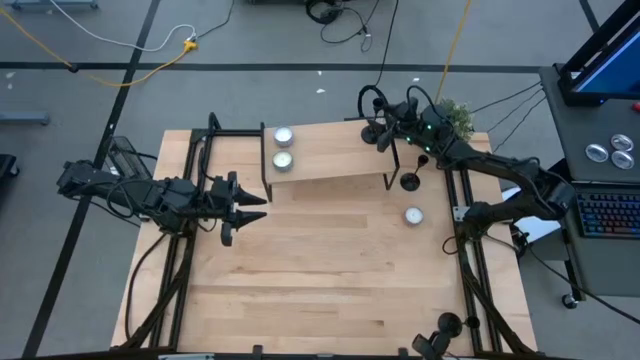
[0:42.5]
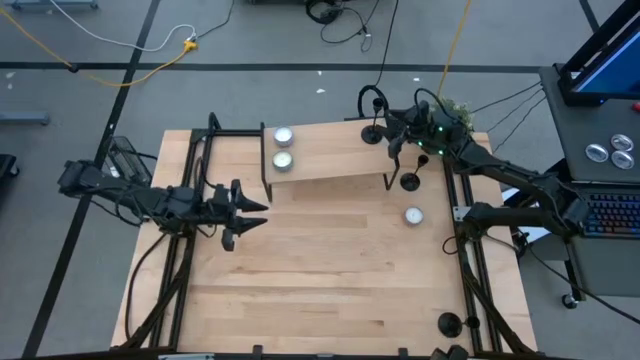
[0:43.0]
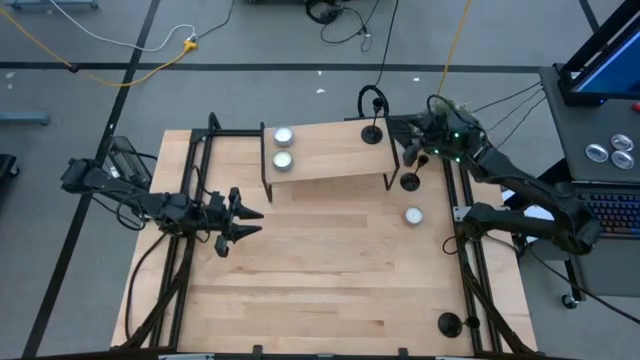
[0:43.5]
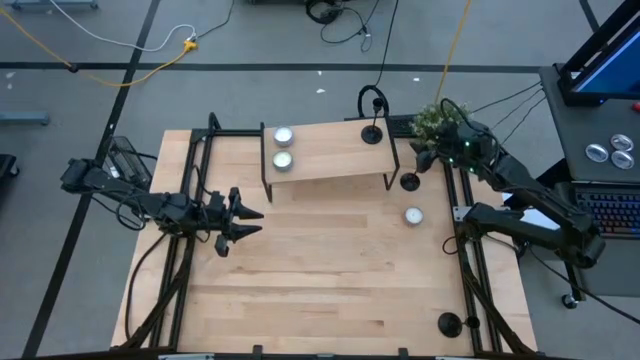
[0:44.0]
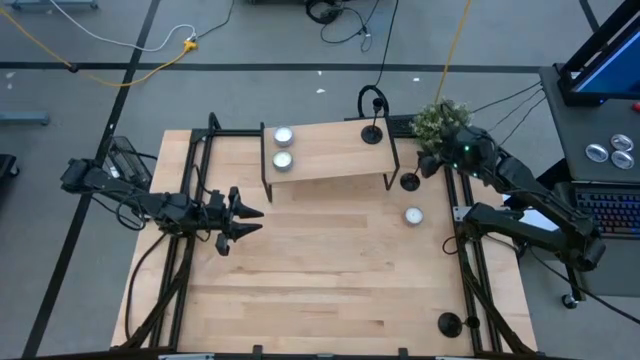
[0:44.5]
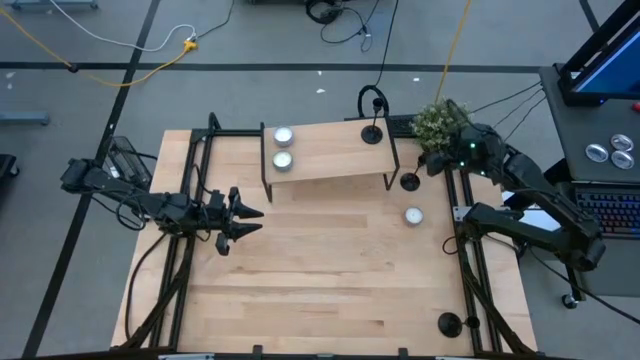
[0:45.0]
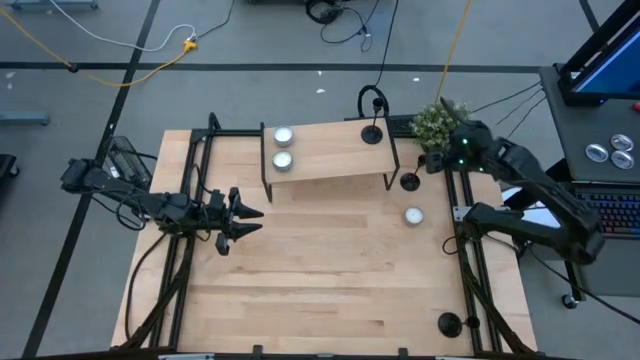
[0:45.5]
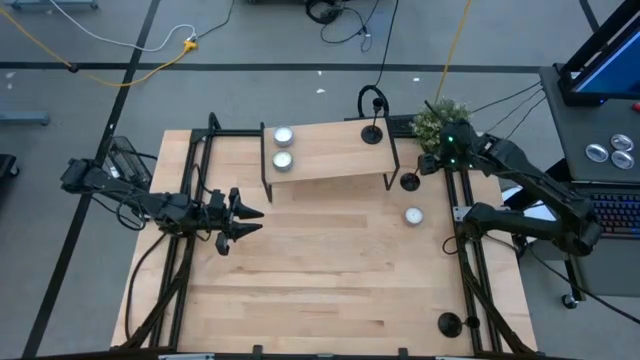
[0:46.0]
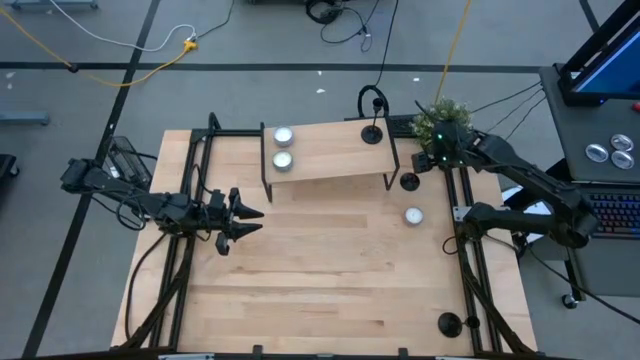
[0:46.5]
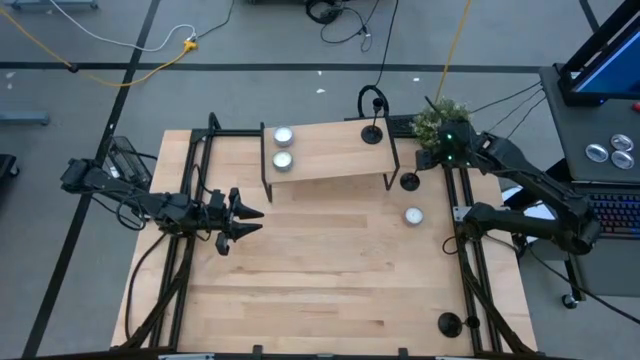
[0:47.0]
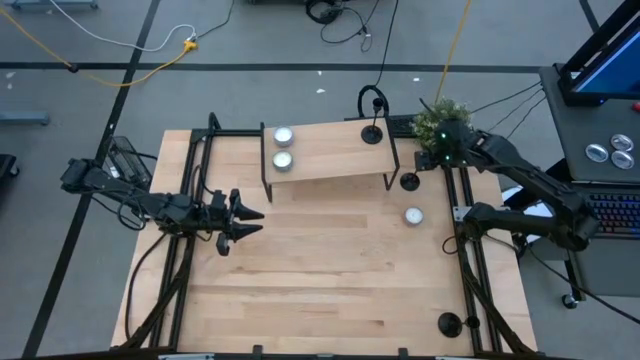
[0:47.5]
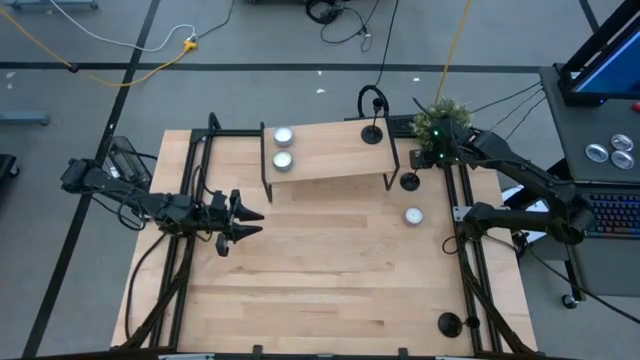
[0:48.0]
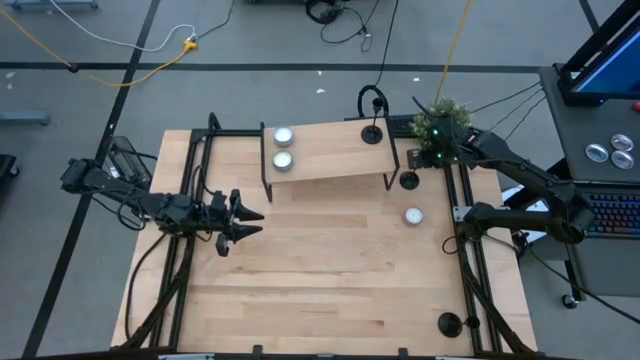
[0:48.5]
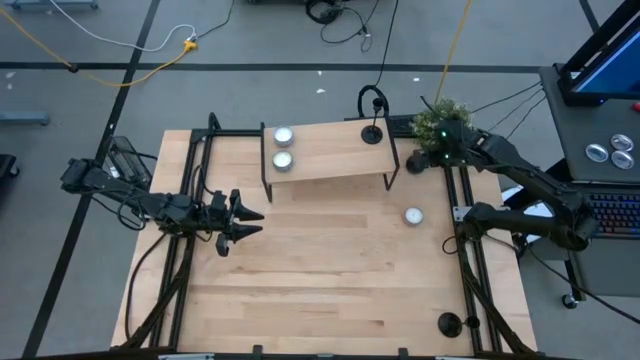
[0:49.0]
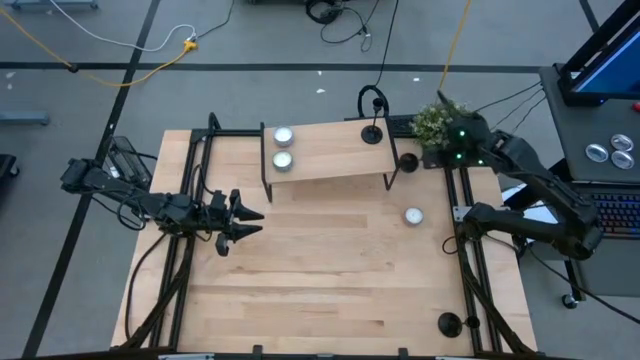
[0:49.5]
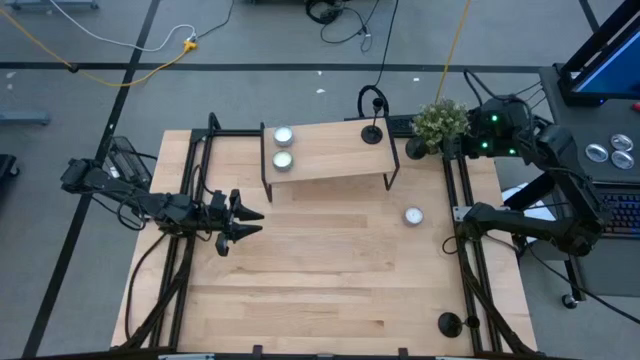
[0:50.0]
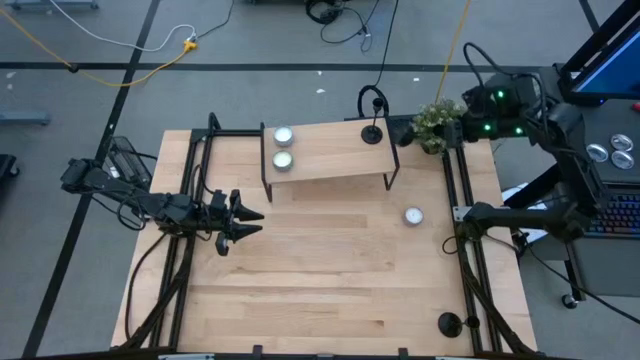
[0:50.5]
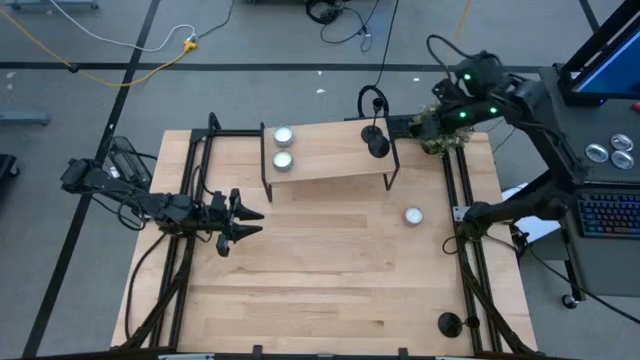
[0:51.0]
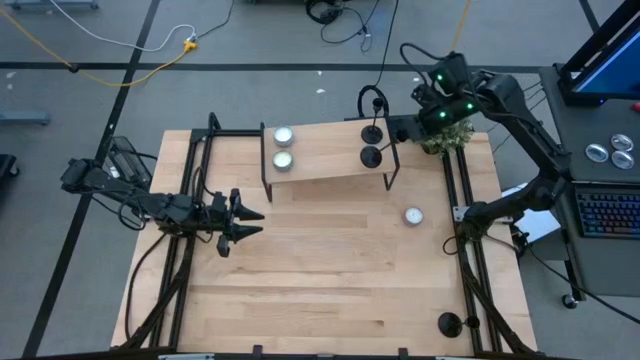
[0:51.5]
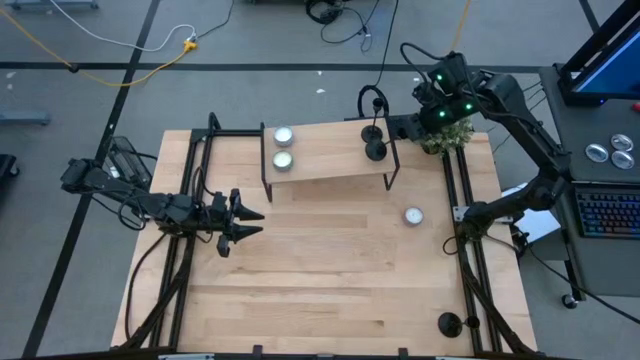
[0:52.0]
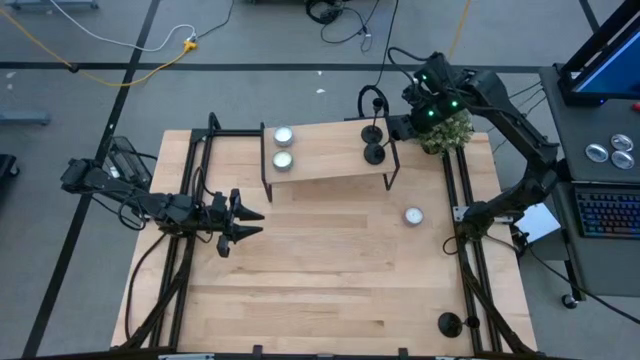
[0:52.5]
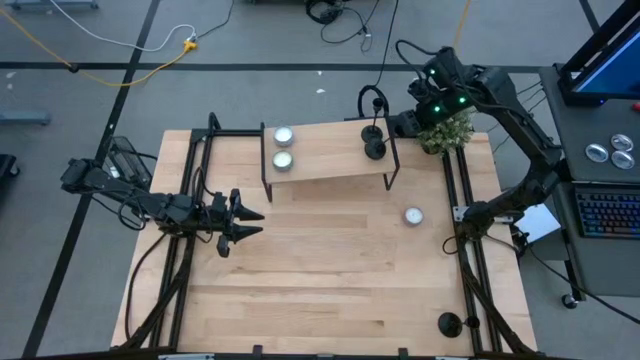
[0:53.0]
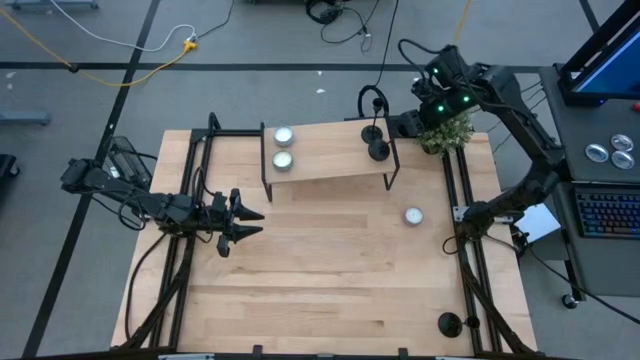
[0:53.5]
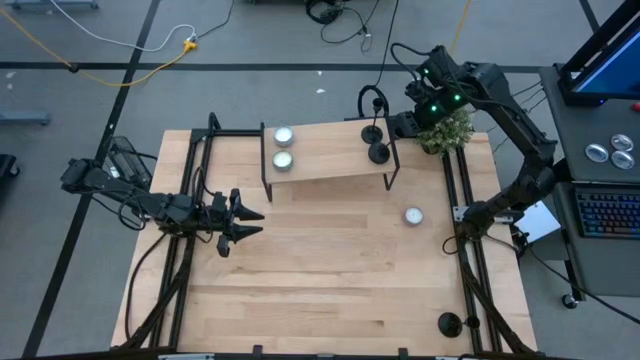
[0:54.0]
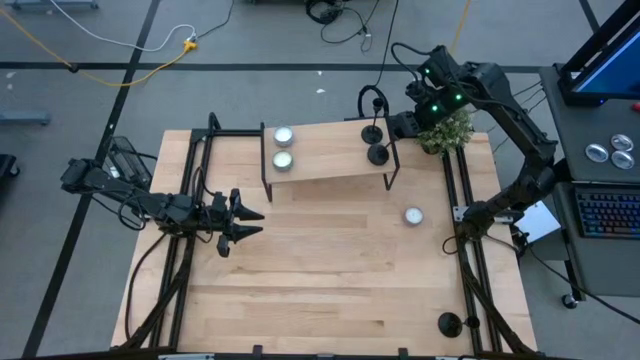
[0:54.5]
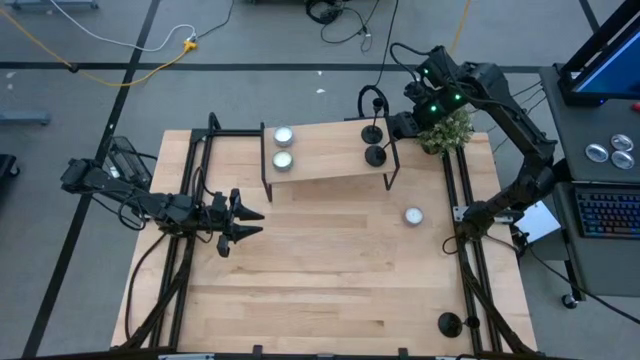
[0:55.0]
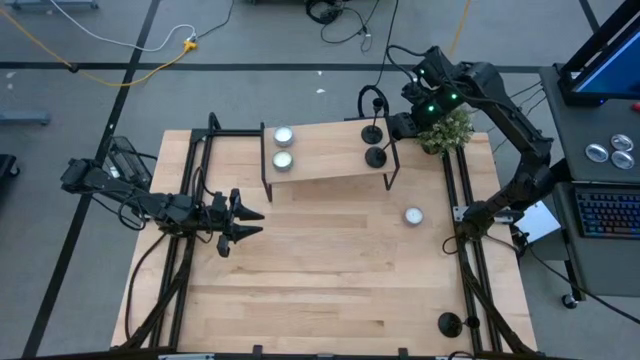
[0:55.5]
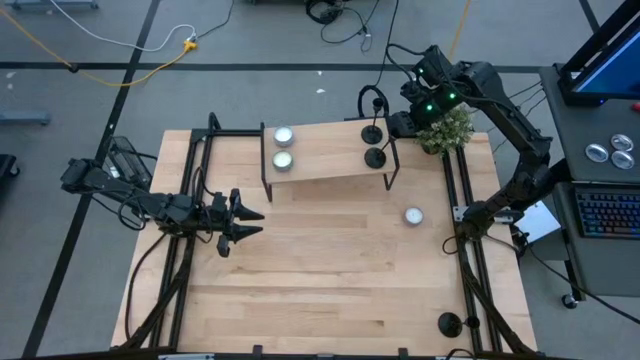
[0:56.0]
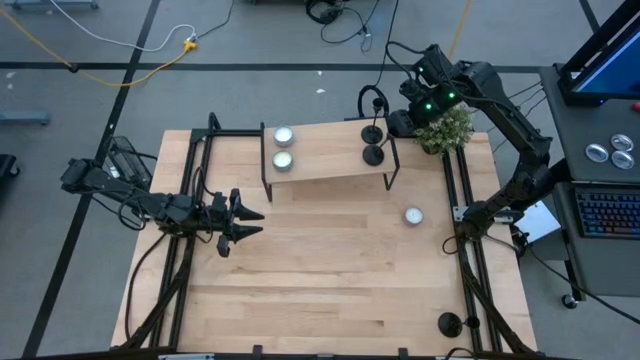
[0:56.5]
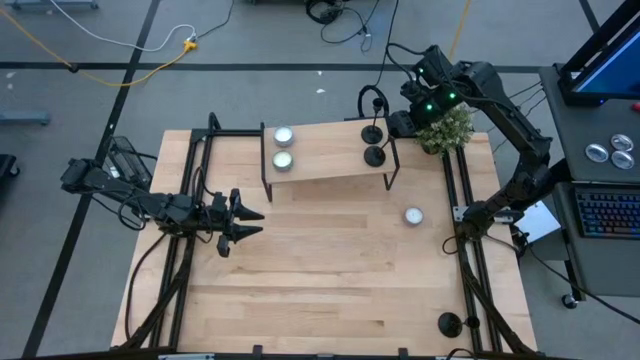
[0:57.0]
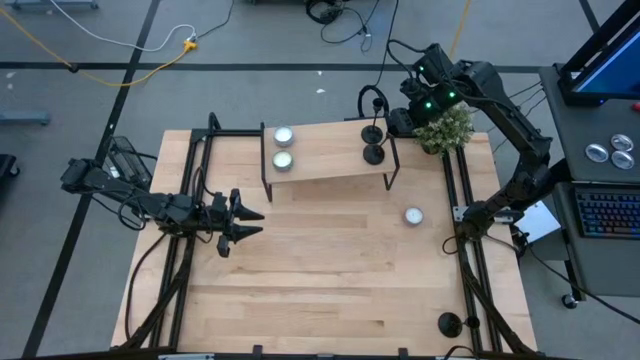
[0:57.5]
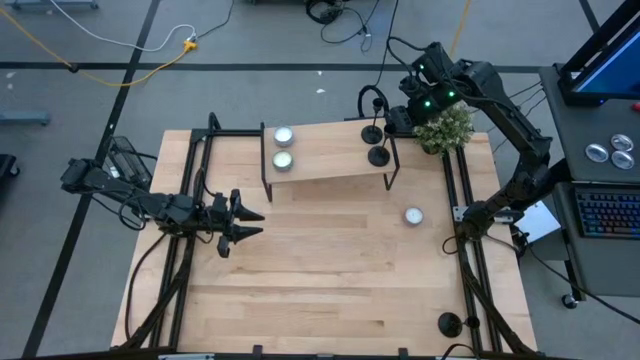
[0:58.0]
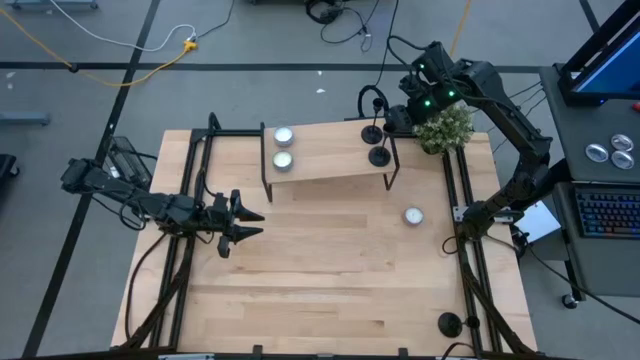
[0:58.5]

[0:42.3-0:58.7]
Task: Pick & Place candle stick holders
Put the top black candle holder on the shelf

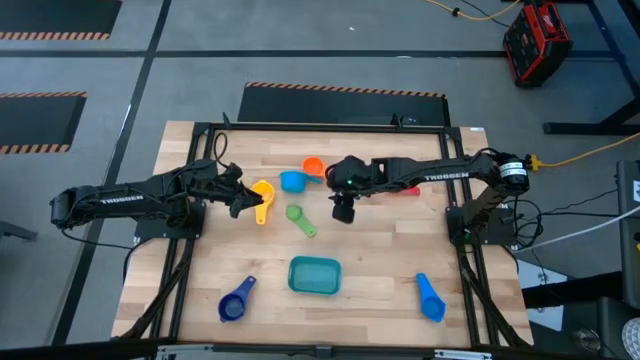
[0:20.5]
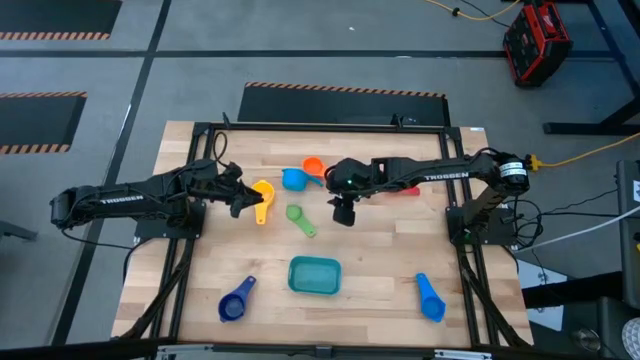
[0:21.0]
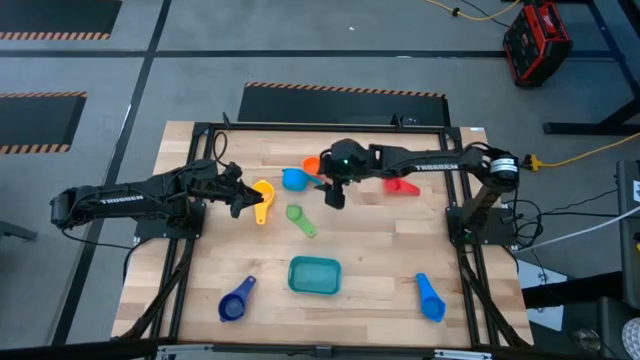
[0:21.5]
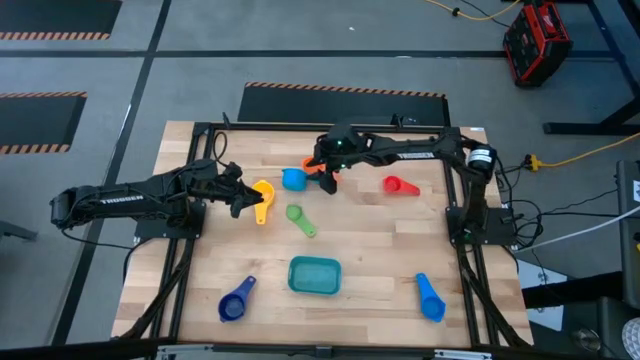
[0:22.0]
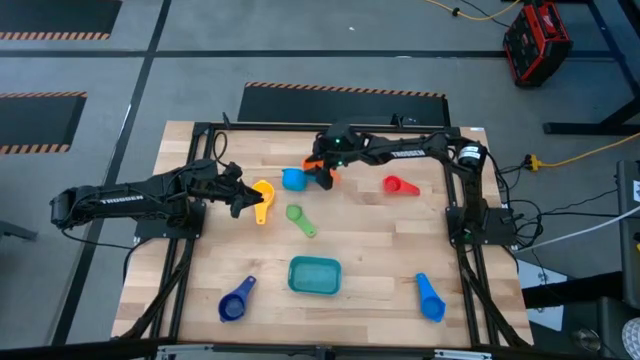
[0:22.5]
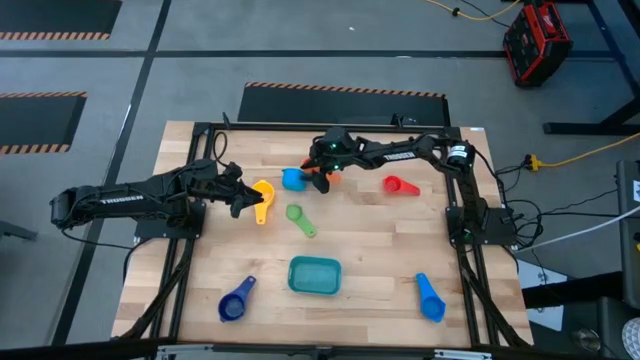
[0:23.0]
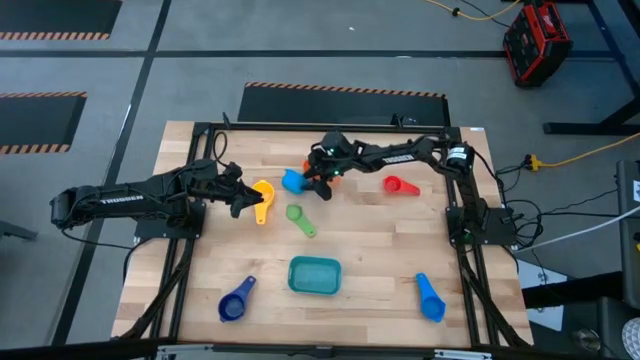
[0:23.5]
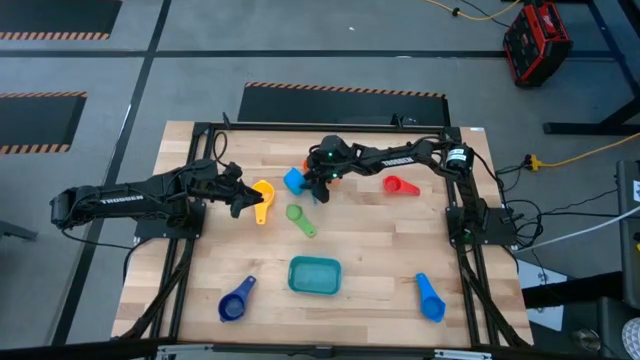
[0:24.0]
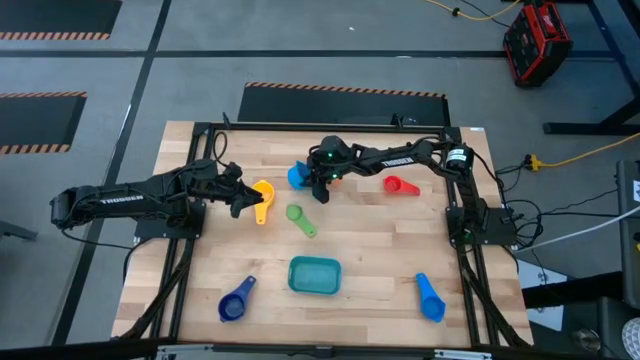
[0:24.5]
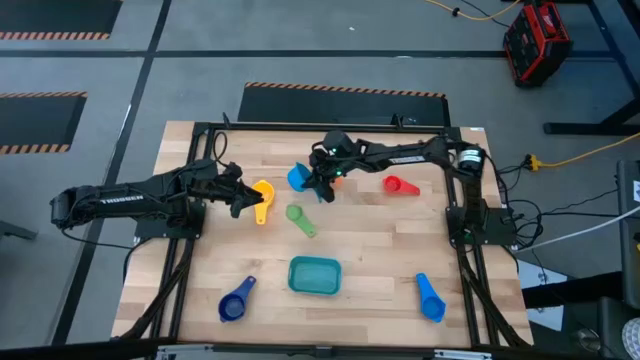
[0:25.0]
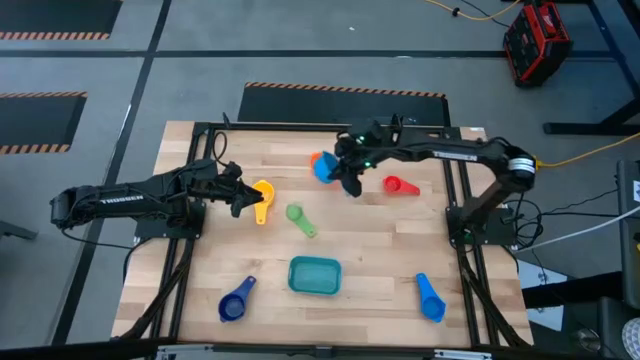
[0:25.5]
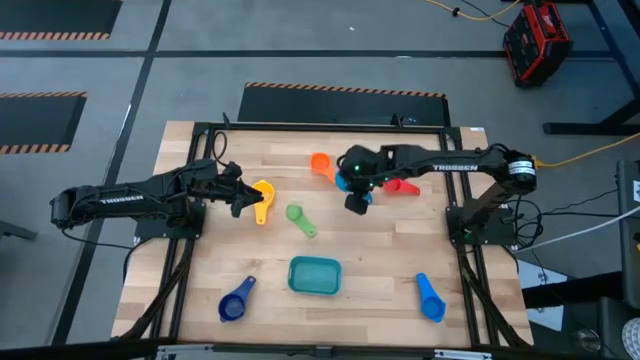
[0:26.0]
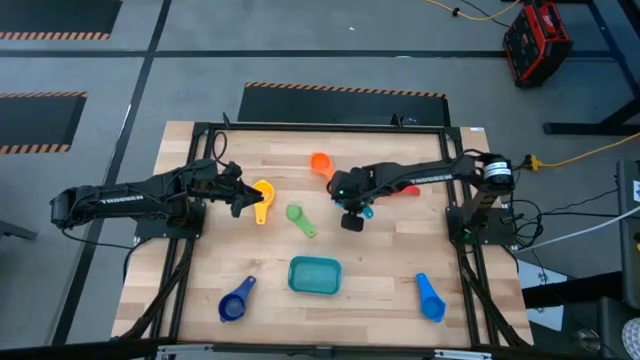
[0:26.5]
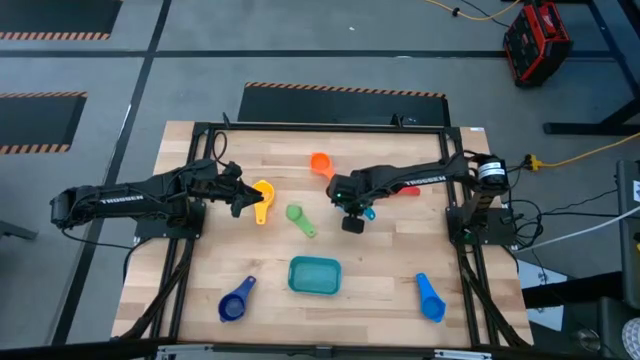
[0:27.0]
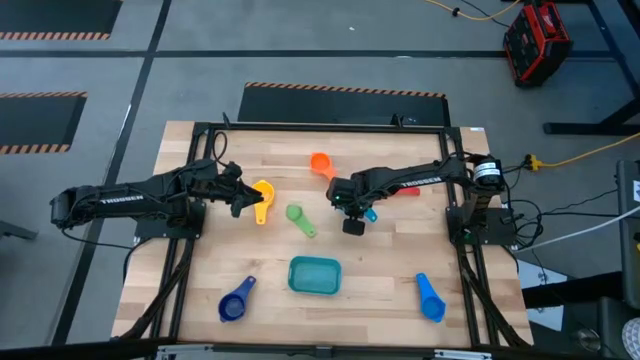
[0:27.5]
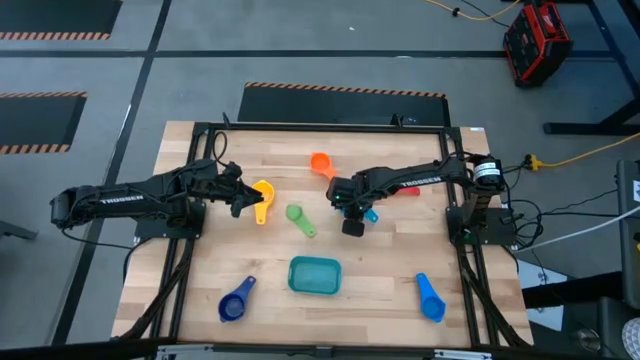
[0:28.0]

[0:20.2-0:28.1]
Task: Nest measuring cups in basket
Adjust the light blue measuring cup
